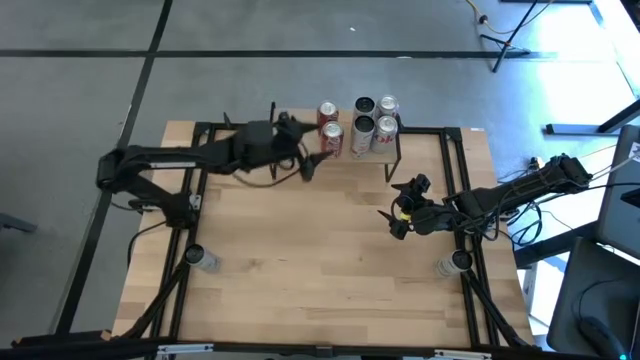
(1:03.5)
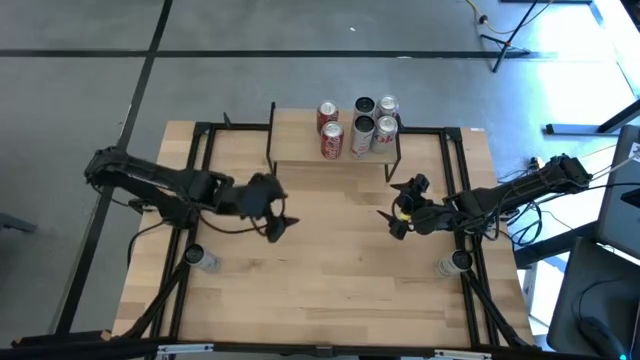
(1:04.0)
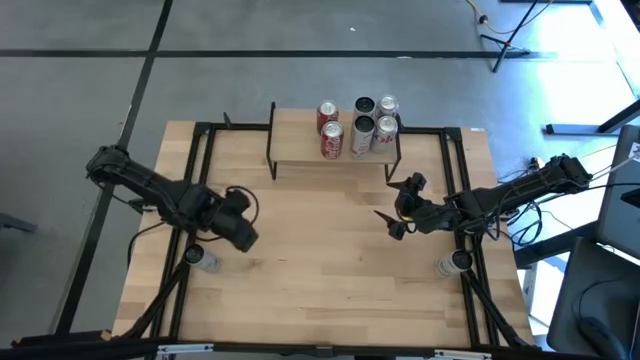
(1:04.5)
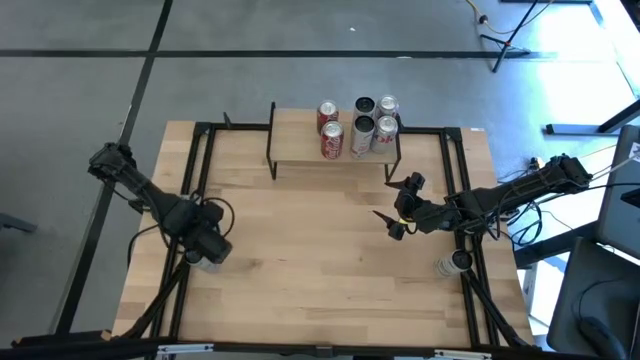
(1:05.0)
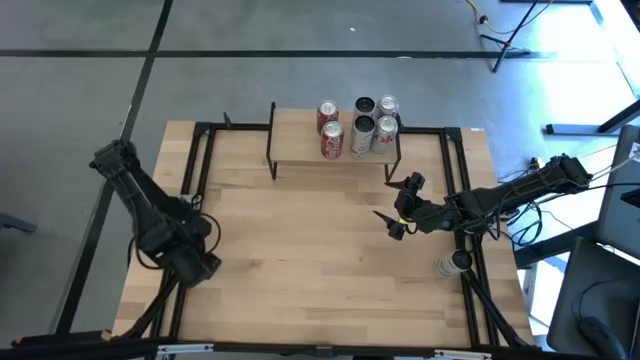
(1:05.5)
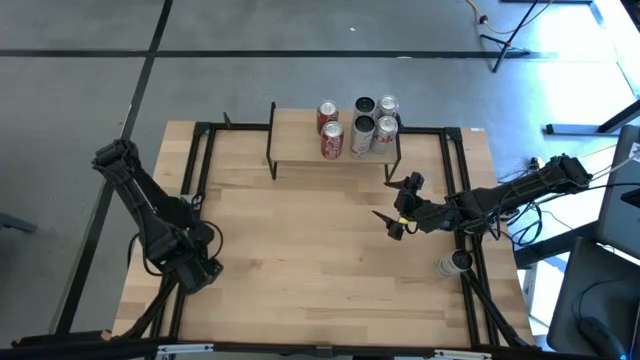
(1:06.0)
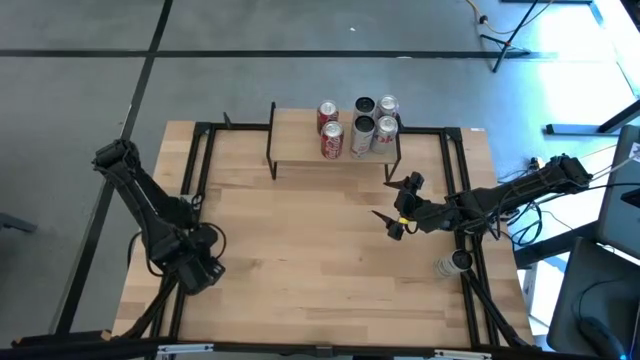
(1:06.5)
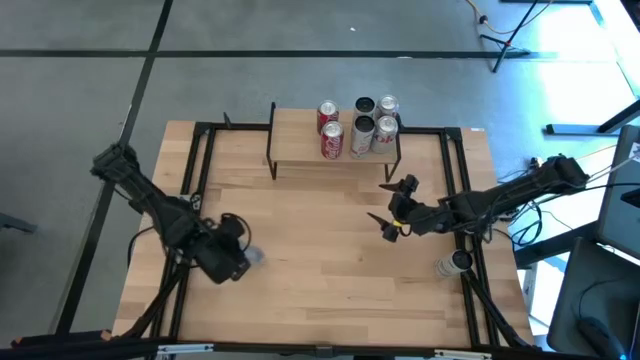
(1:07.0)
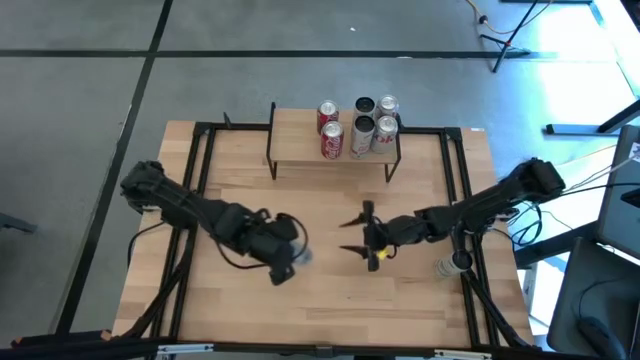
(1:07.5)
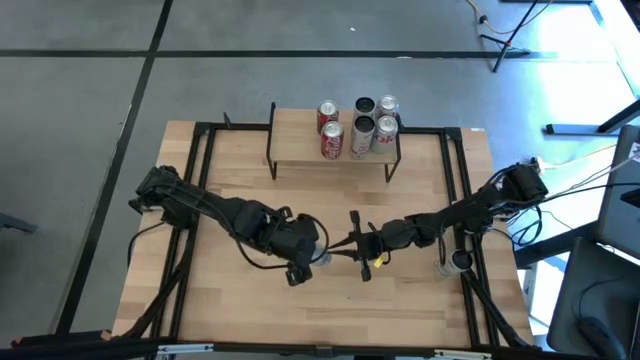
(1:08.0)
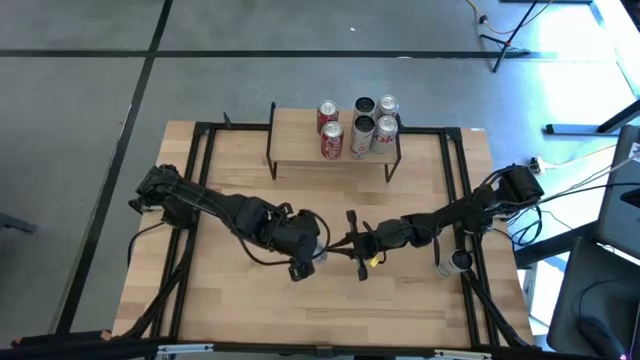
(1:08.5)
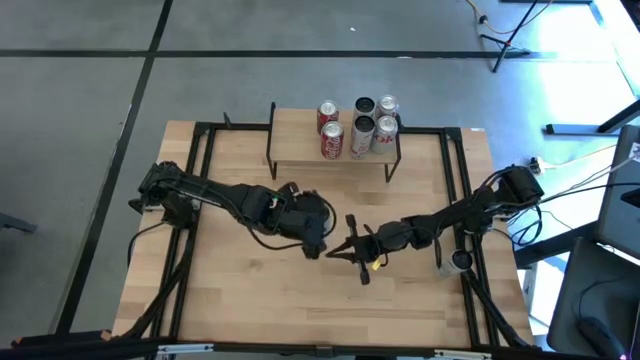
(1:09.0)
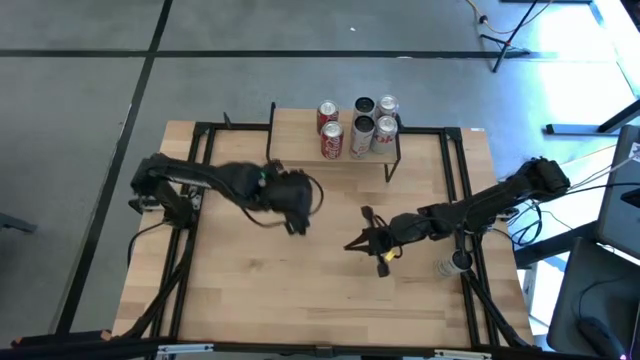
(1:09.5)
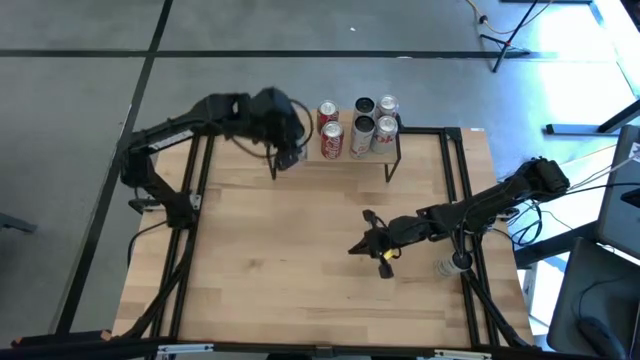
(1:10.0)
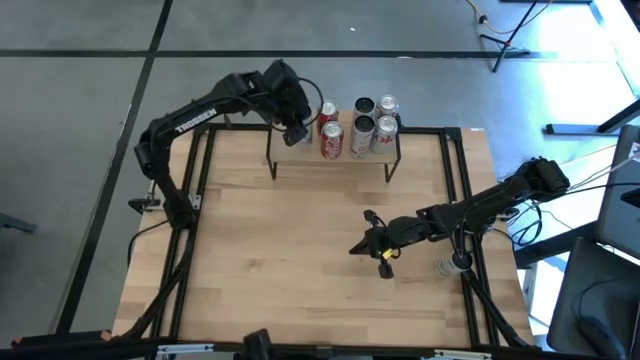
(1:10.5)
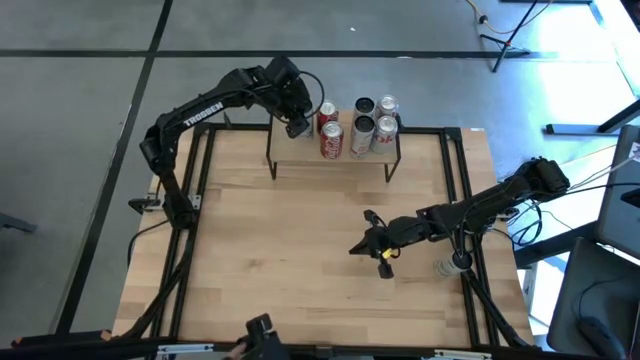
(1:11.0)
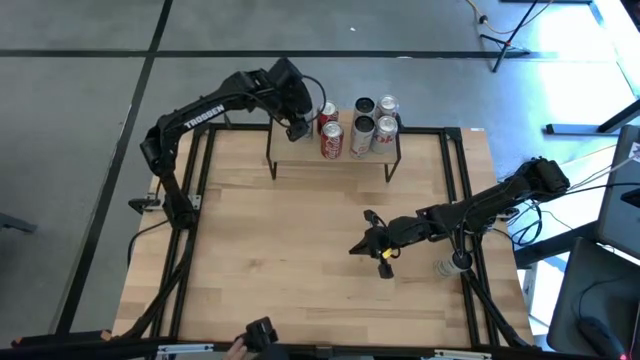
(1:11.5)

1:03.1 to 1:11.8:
Task: Place canned beverage on shelf
Put the left white-blue soda can on the shelf

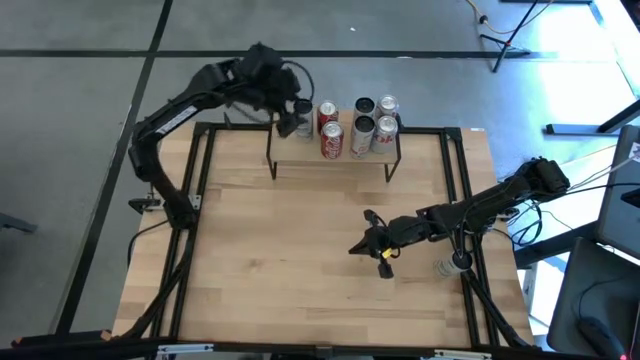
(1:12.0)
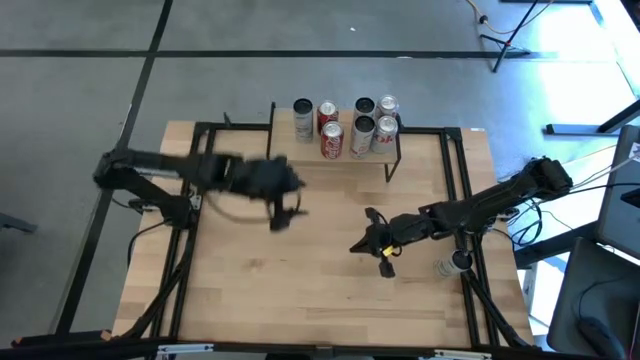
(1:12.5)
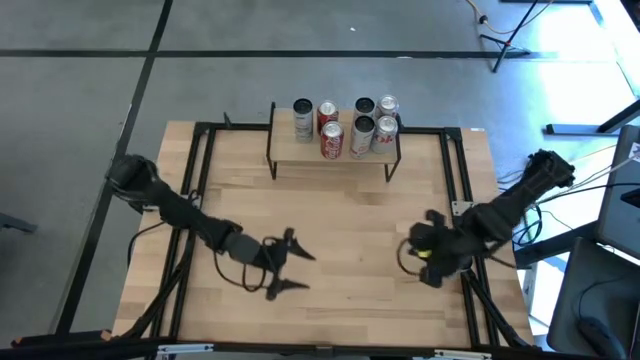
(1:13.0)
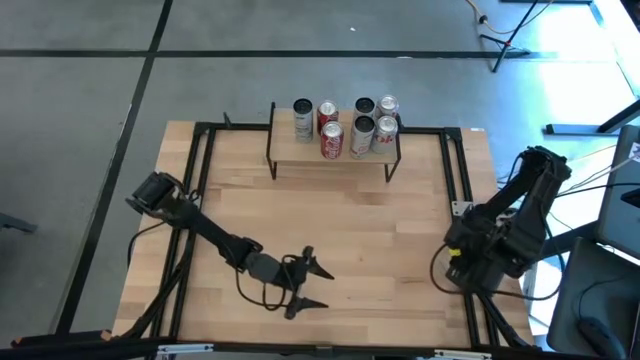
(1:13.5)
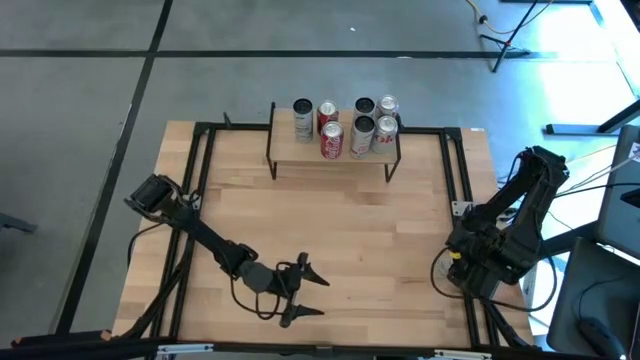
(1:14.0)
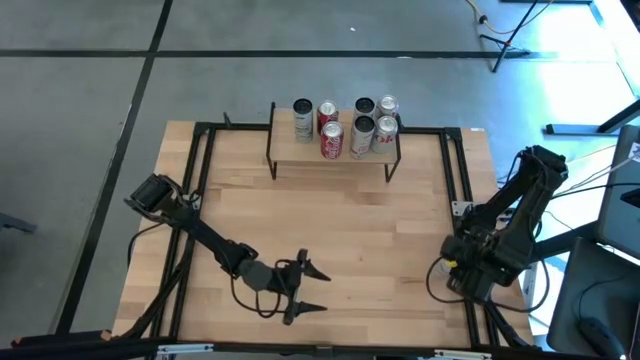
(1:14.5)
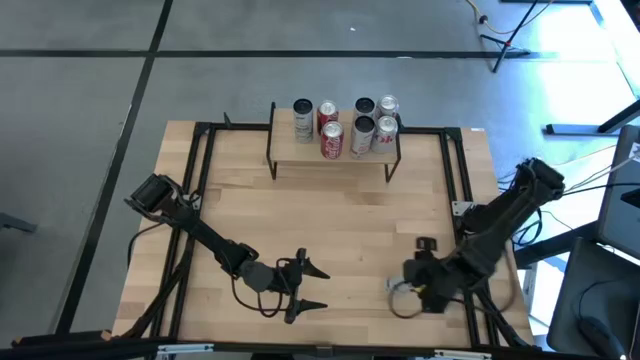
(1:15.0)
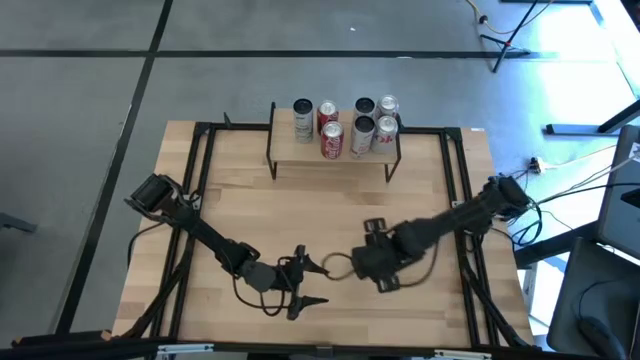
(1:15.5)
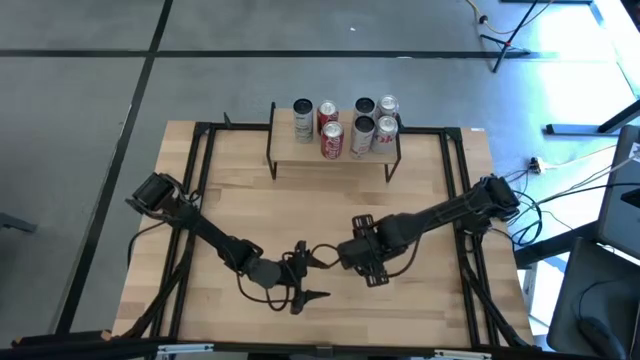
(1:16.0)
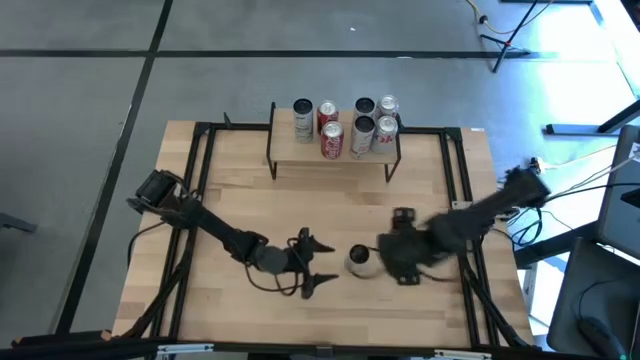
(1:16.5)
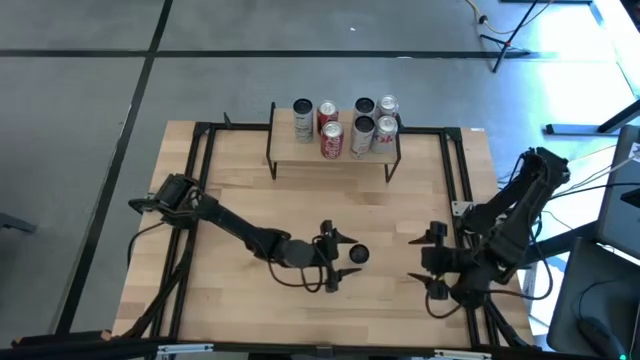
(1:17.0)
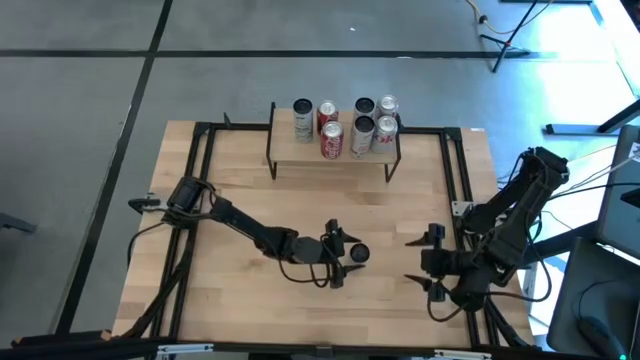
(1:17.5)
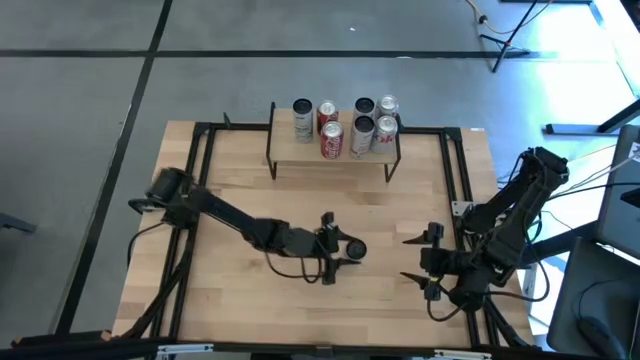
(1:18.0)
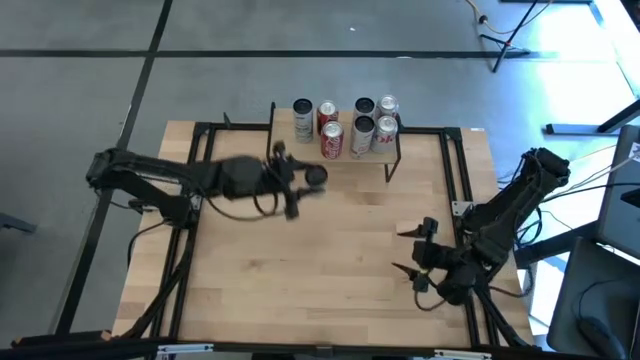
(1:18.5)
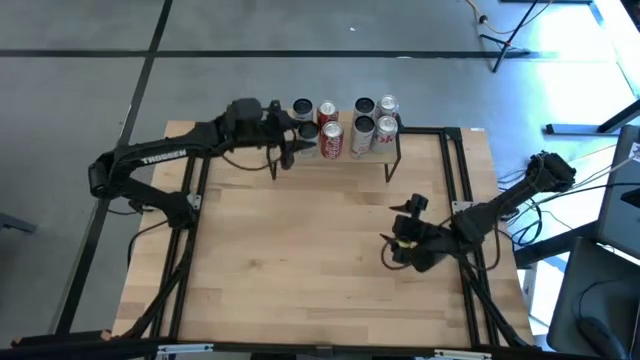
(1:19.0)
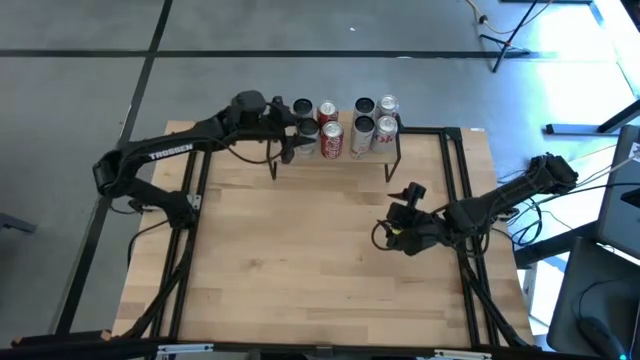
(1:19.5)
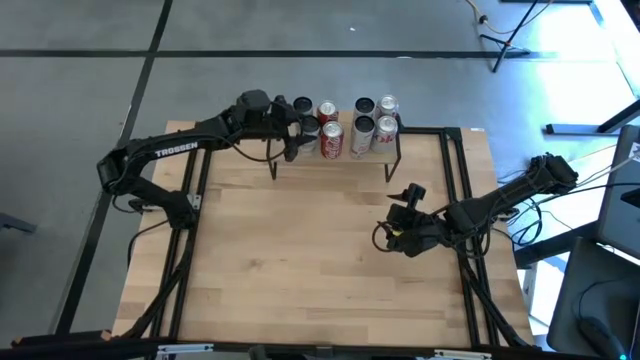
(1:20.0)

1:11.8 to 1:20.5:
Put the white-blue soda can on the shelf aligned with the other white-blue soda can

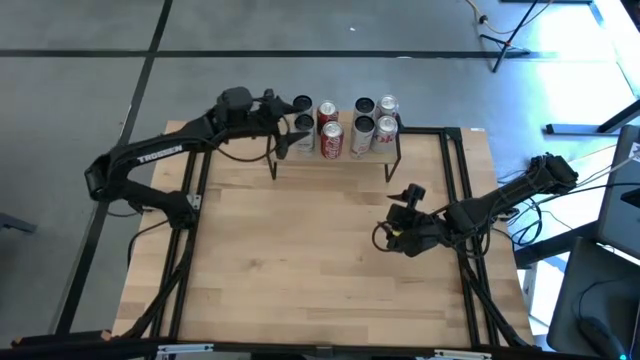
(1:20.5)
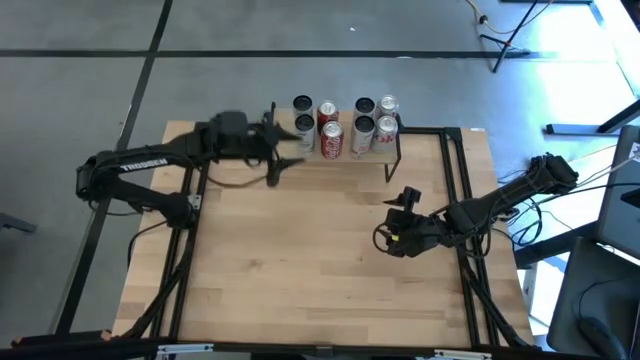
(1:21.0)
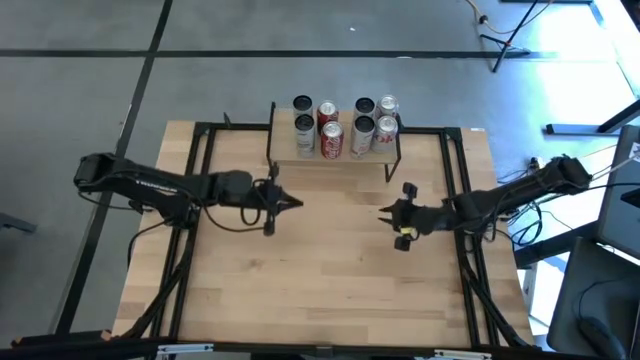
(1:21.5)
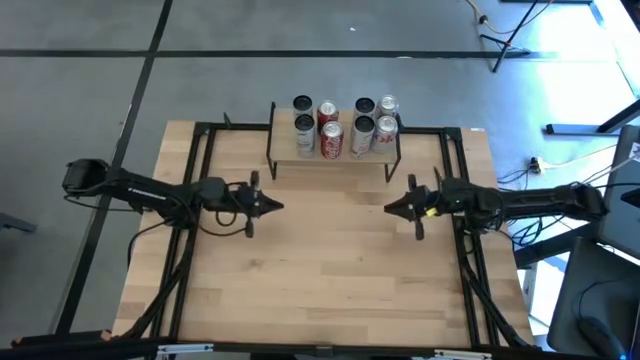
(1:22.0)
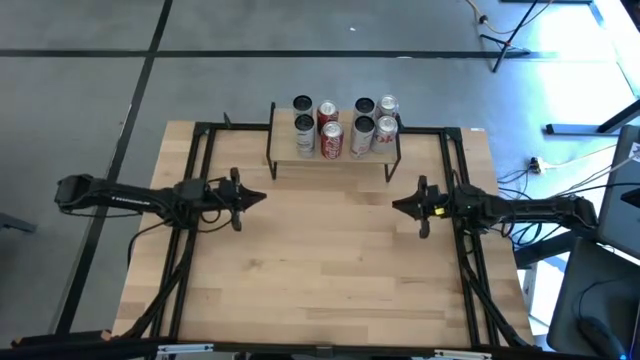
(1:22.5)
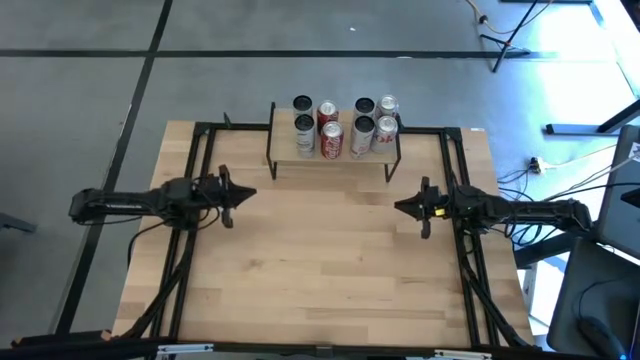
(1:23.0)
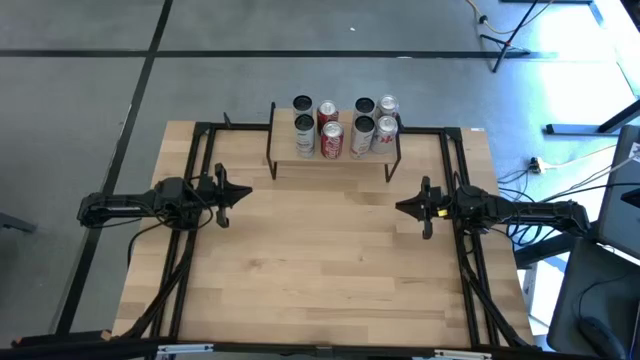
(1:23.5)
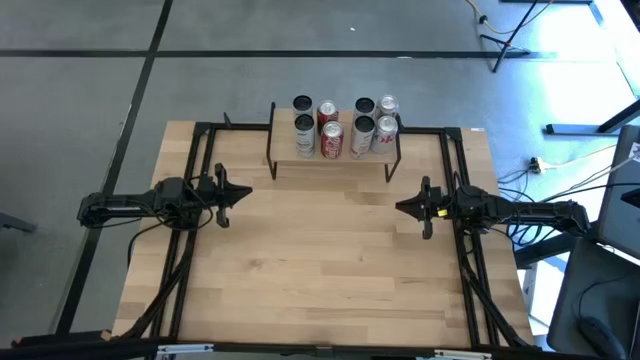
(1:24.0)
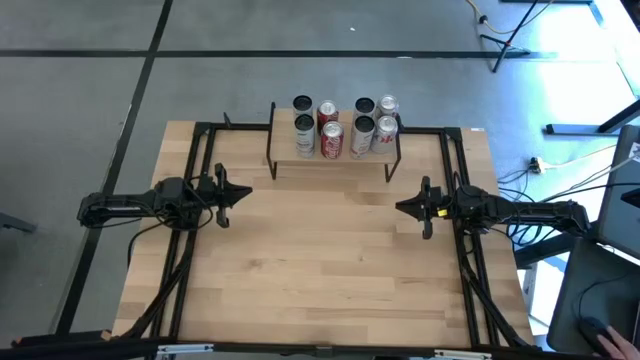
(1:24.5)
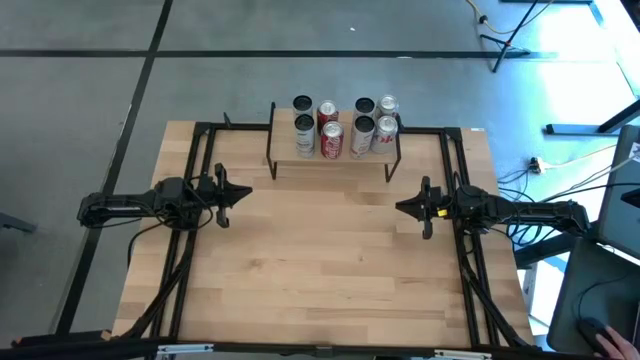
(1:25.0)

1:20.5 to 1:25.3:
Return to Home Position

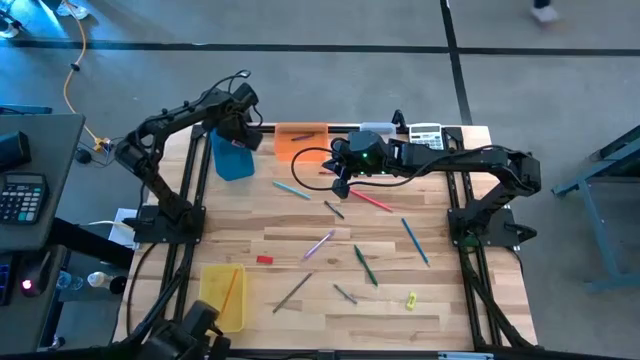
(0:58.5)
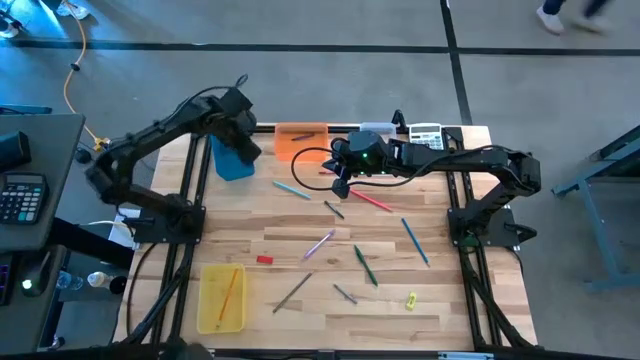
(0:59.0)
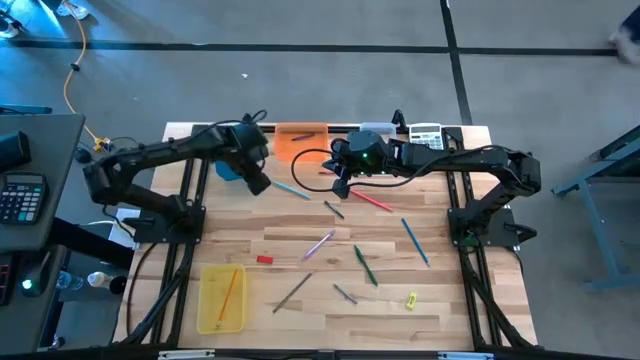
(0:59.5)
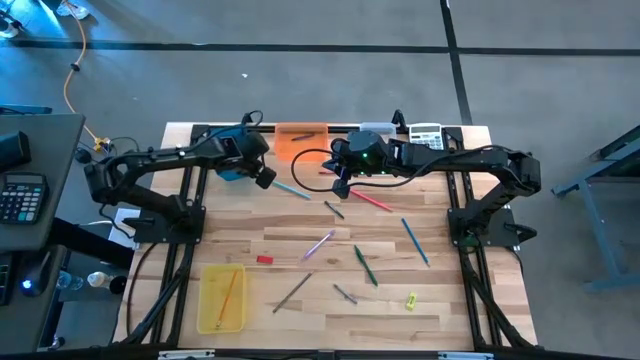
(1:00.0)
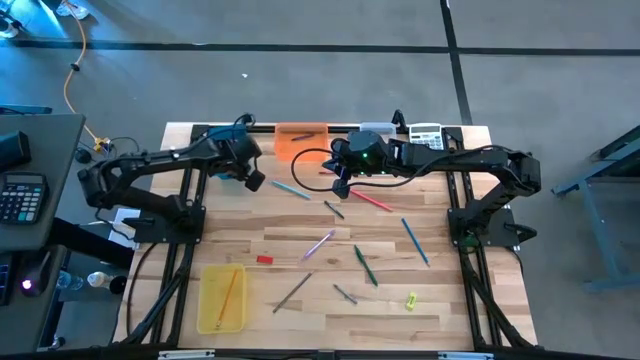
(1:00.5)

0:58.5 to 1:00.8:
Task: Sort crayons/erasers/pens/pencils in bins
Adjust the blue bin
